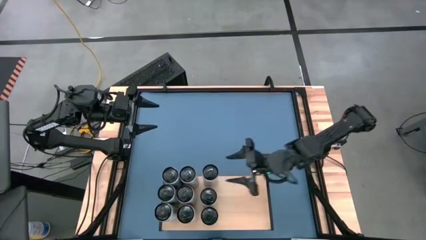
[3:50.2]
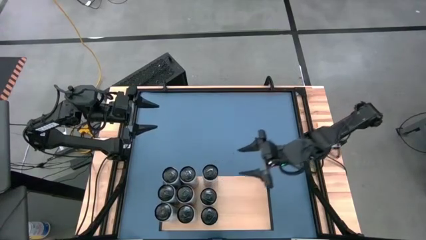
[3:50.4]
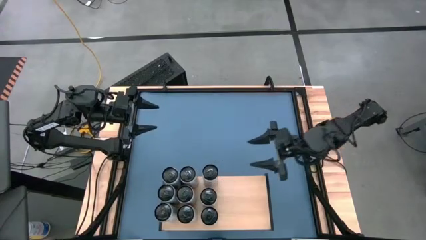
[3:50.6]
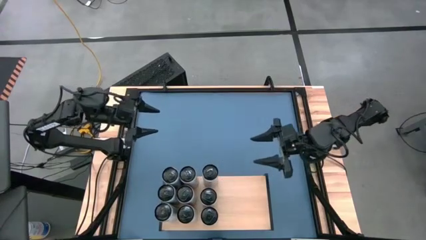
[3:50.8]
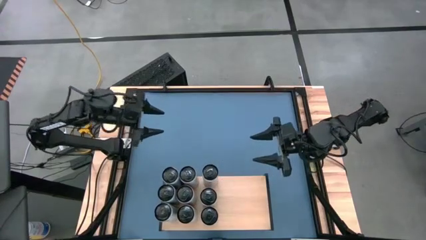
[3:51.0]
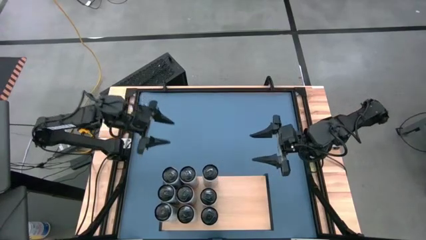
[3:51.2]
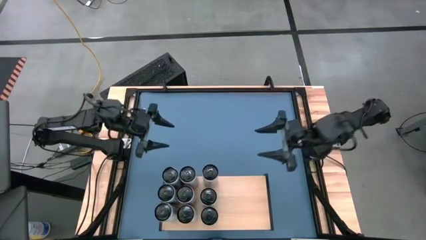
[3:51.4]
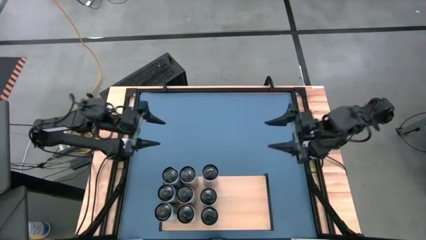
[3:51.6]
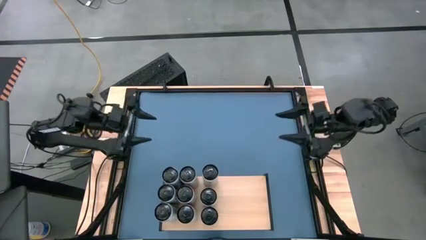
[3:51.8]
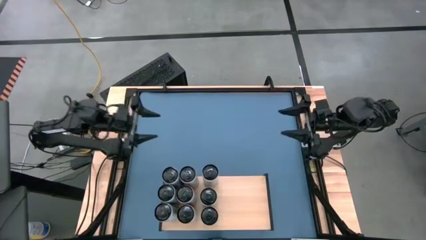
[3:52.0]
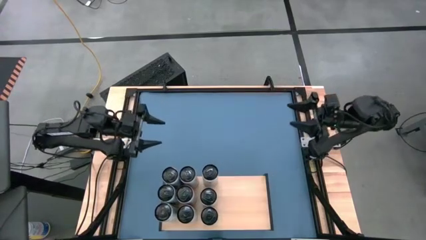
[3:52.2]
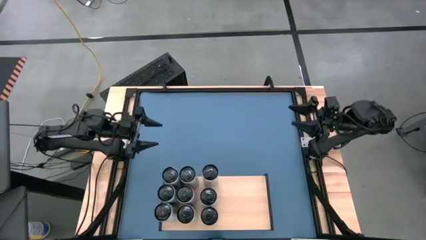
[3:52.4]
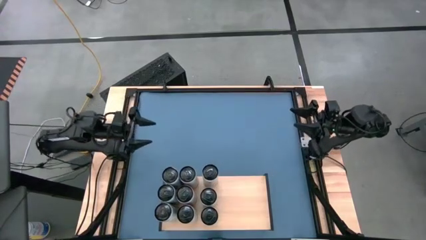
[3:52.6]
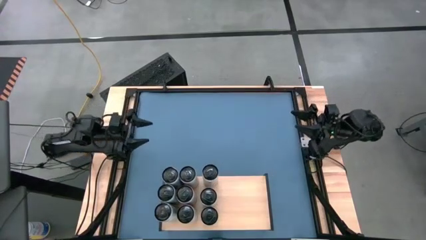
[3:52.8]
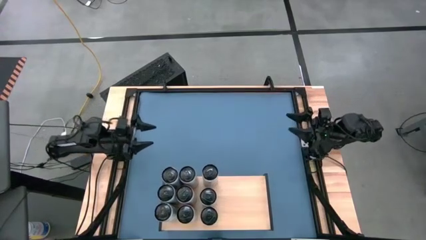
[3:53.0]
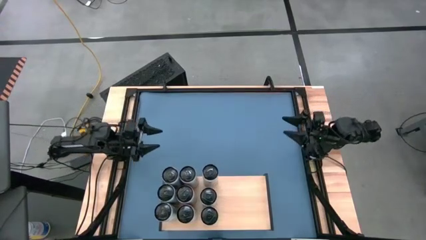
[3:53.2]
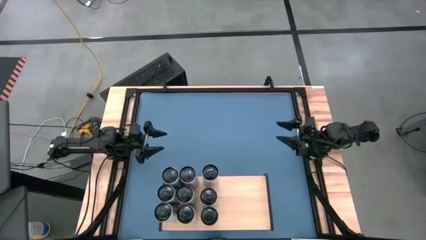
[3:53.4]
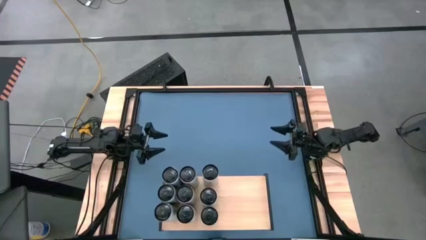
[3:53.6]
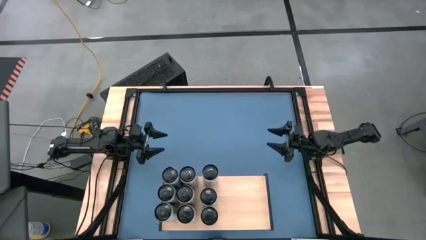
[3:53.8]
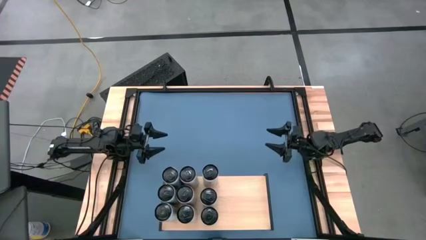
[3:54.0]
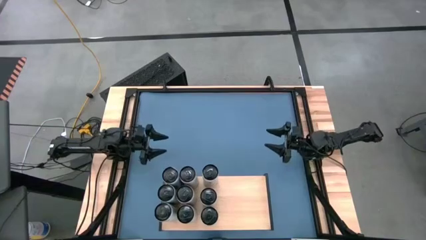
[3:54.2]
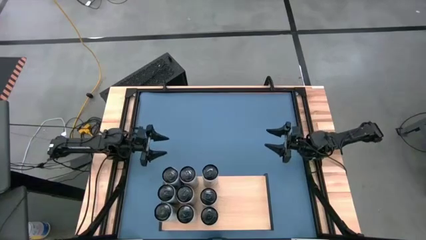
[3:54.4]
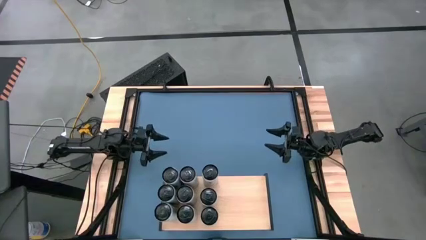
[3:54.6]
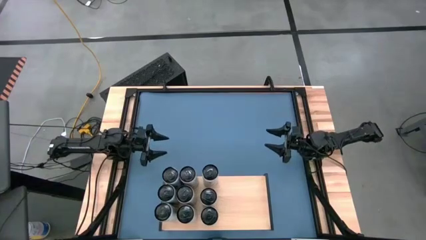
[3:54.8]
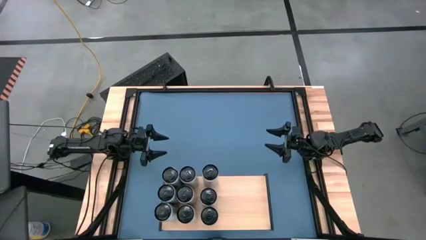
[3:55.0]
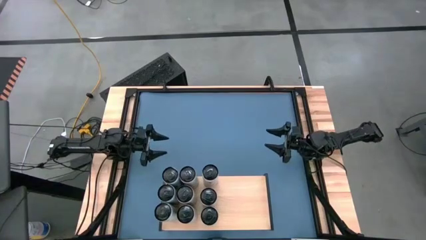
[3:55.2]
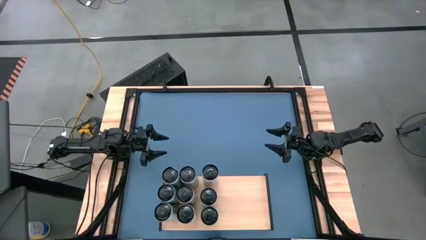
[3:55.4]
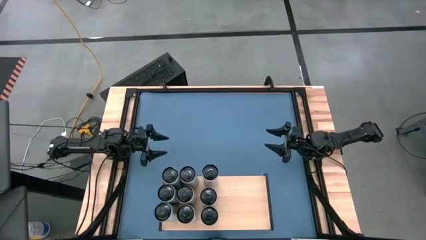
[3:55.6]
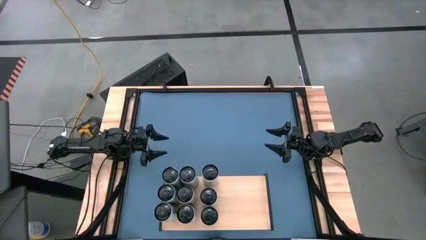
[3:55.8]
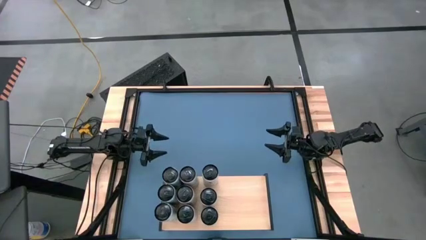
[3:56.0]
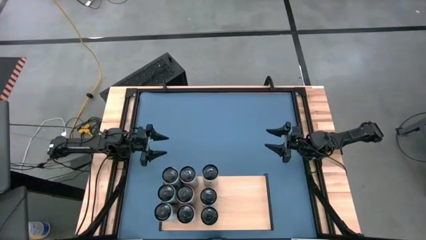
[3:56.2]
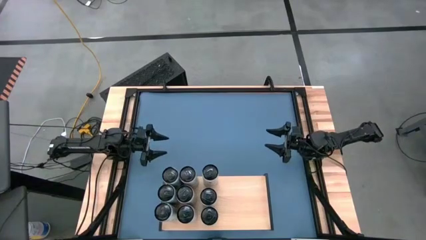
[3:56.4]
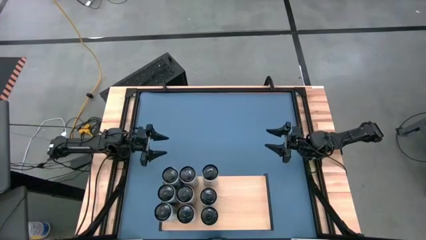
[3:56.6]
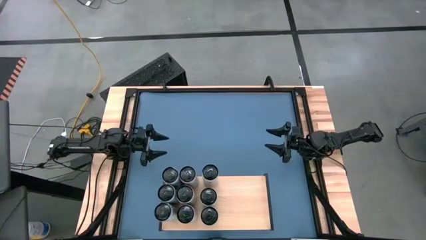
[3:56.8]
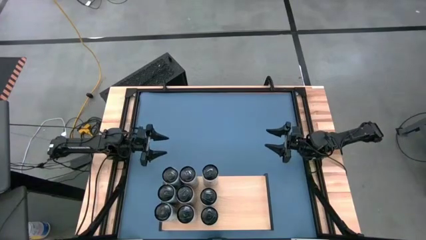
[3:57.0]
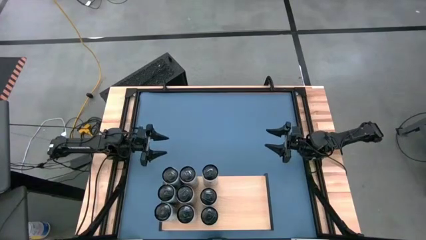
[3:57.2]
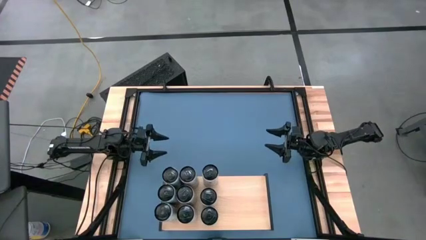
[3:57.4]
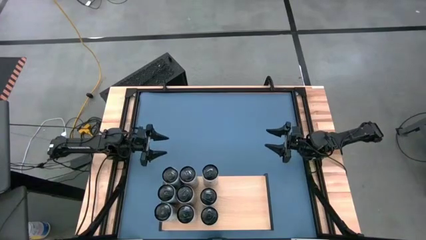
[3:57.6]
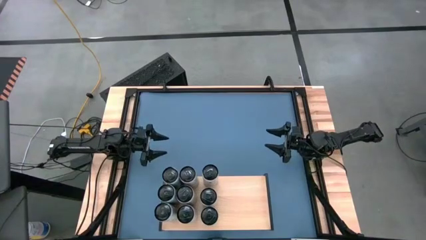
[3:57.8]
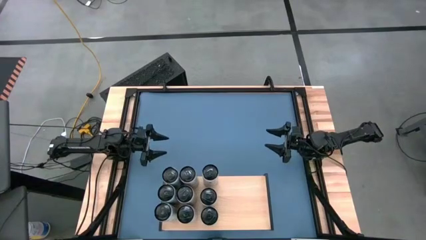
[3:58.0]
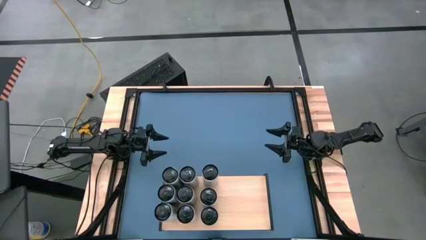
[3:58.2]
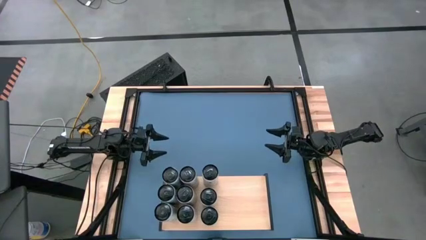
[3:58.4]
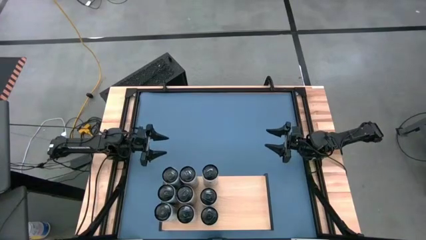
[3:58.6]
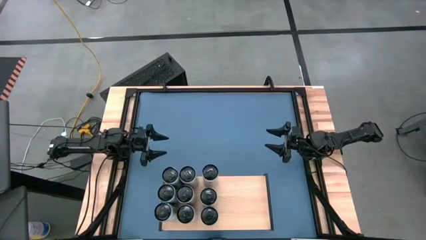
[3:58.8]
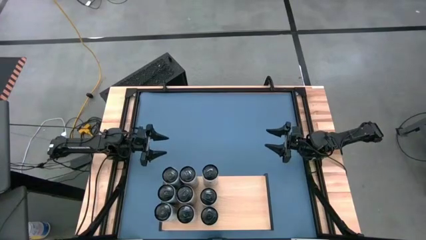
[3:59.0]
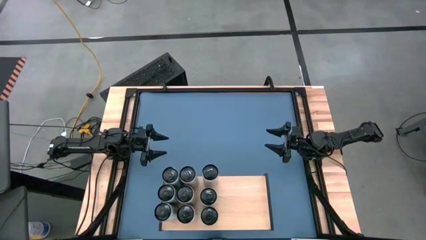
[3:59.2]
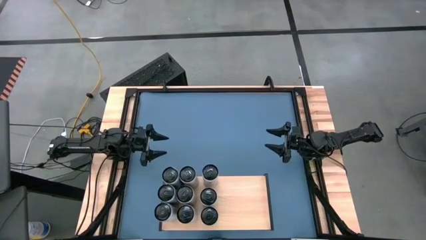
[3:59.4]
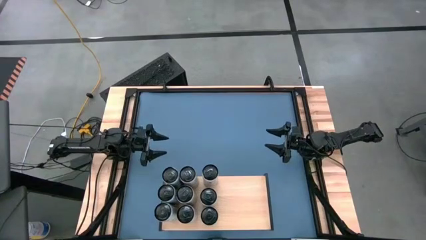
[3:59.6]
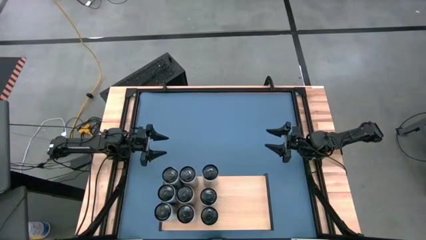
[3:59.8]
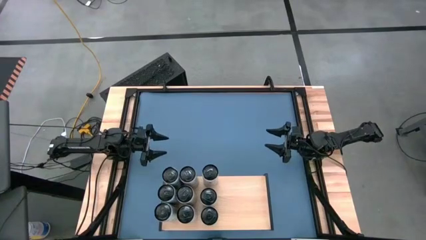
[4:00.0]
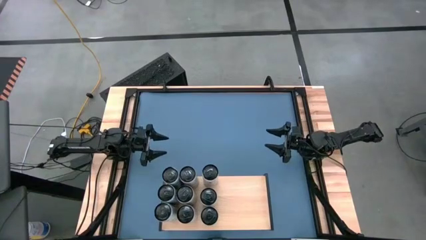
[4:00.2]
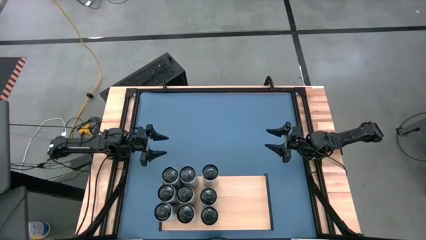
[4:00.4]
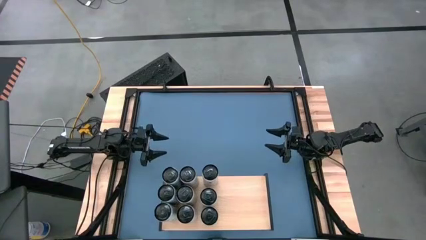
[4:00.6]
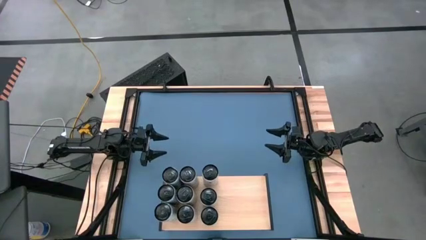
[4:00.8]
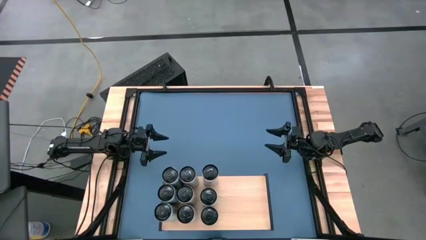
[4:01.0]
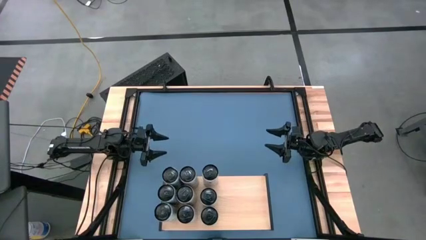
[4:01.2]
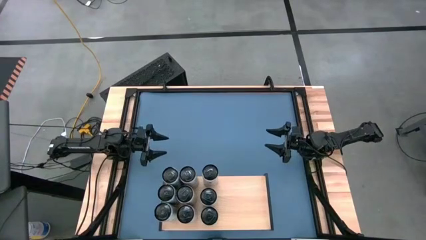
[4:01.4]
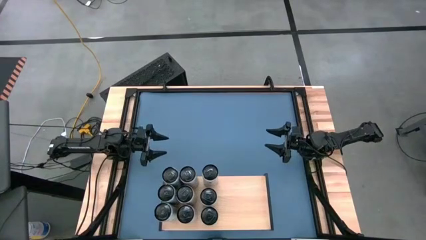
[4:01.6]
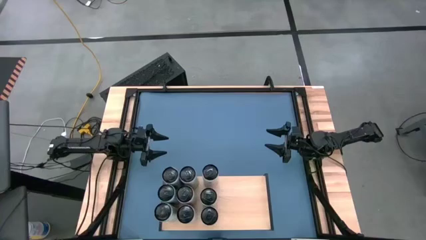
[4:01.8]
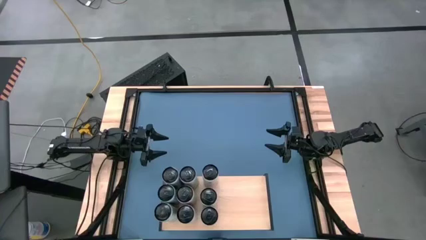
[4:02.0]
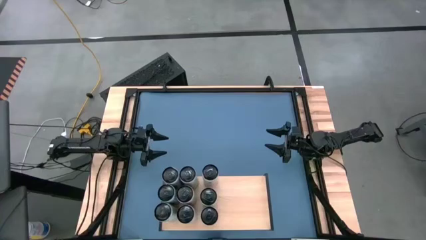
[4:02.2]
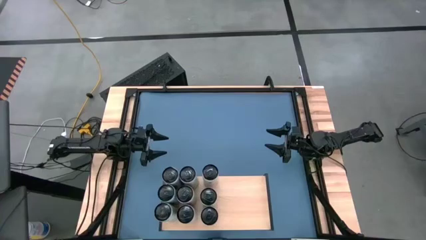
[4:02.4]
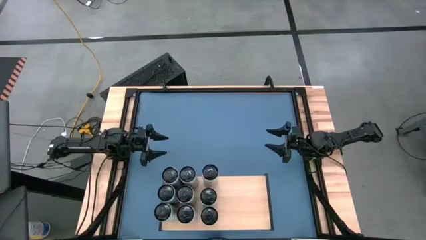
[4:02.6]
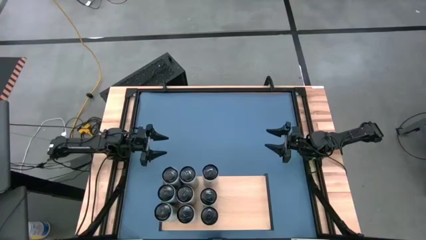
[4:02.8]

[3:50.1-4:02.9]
Task: Place canned beverage on shelf
Return to Home Position
